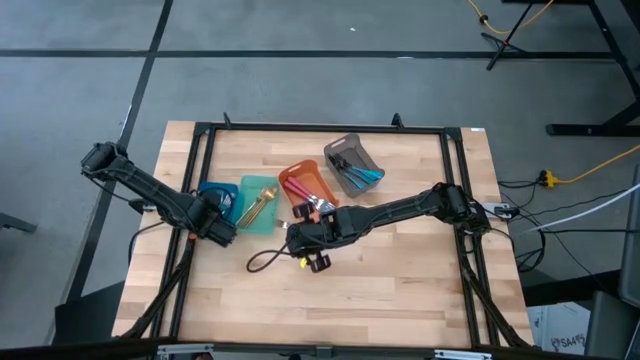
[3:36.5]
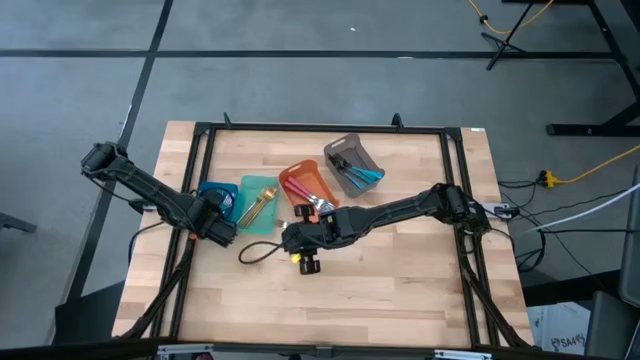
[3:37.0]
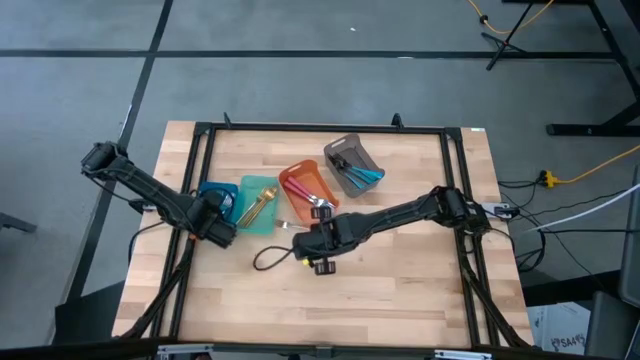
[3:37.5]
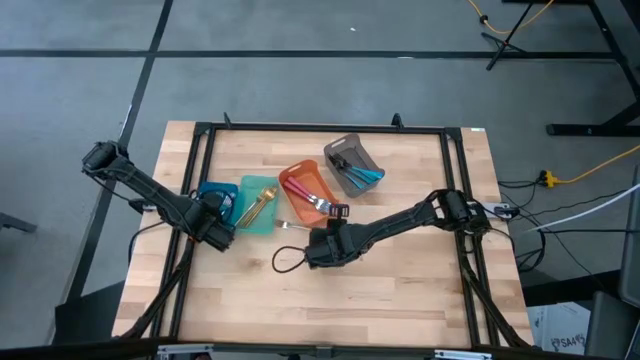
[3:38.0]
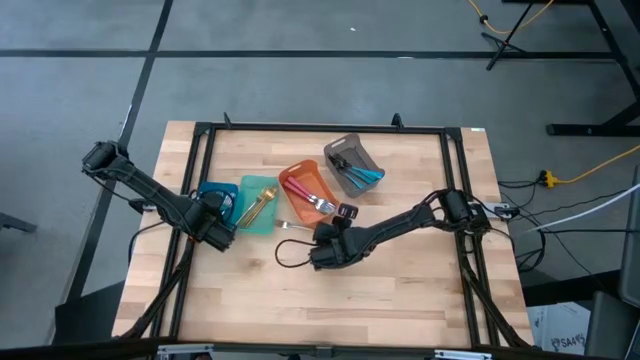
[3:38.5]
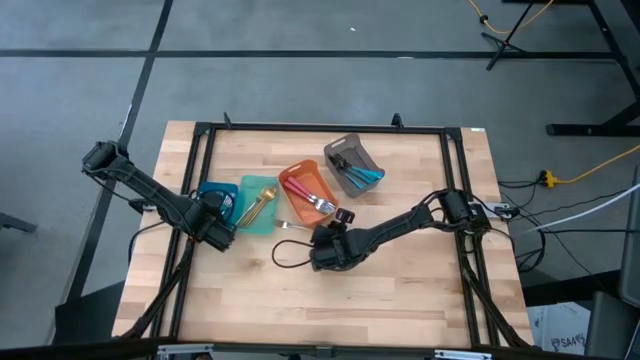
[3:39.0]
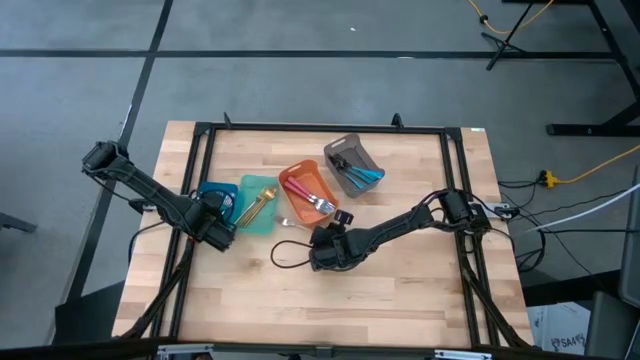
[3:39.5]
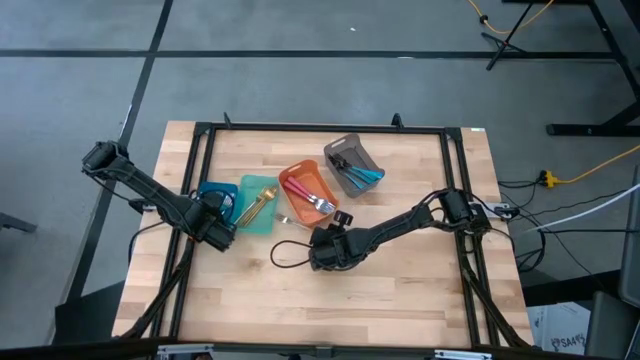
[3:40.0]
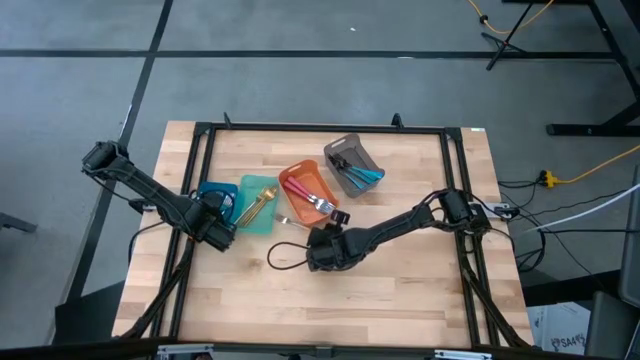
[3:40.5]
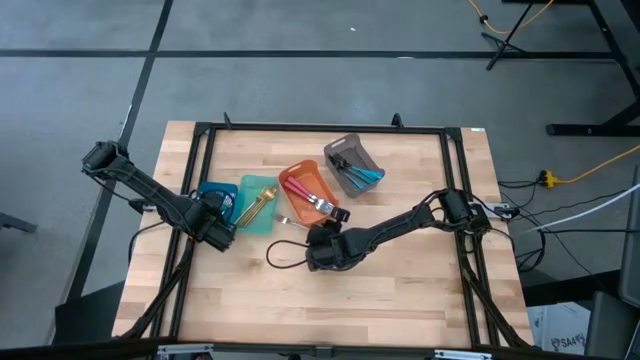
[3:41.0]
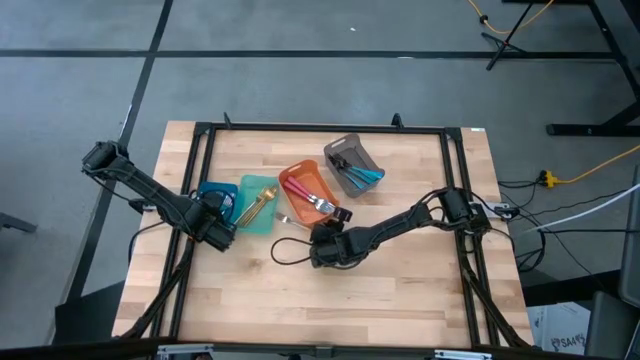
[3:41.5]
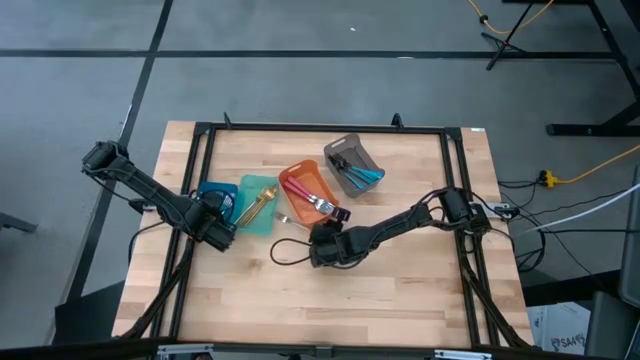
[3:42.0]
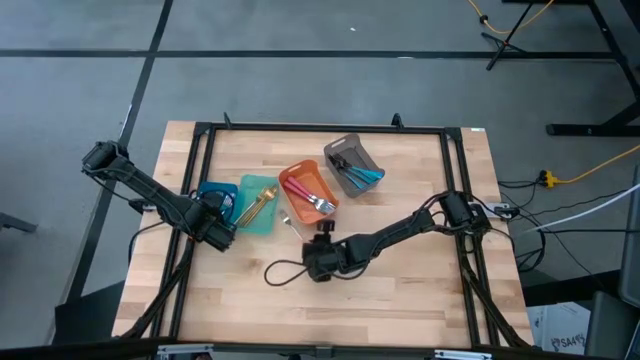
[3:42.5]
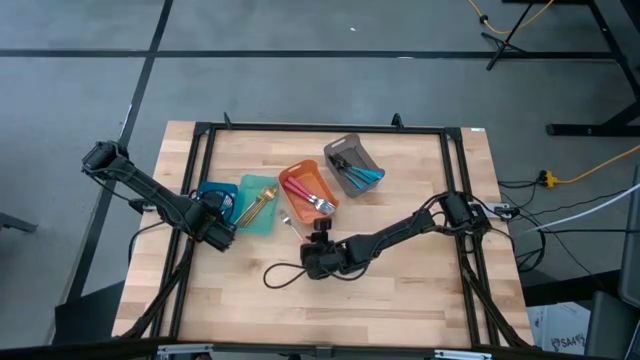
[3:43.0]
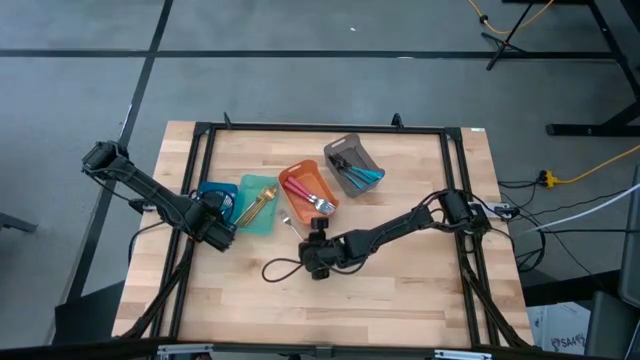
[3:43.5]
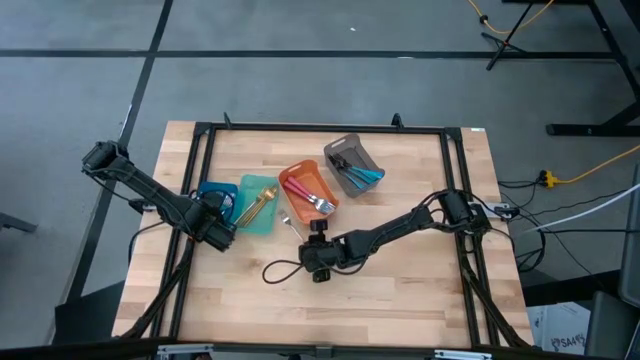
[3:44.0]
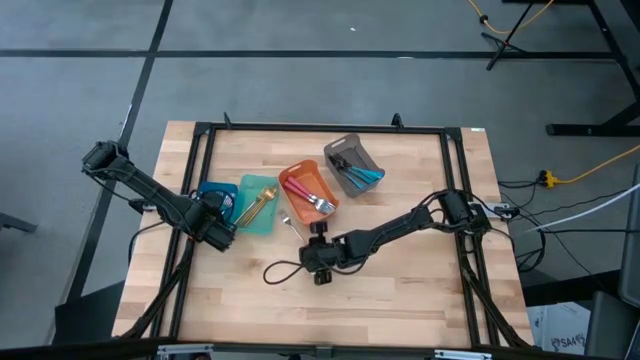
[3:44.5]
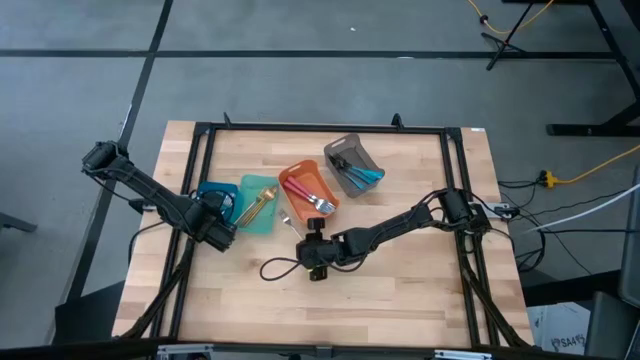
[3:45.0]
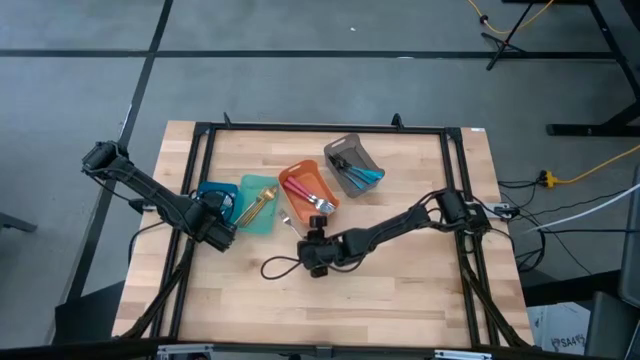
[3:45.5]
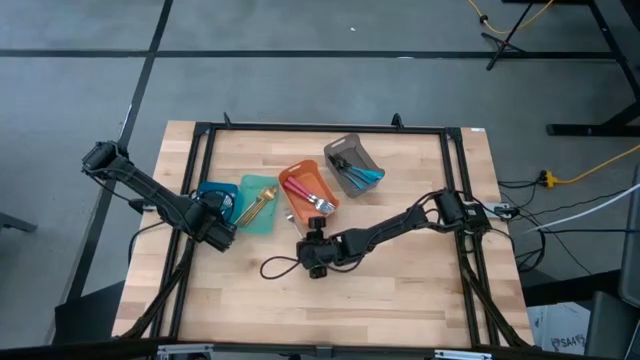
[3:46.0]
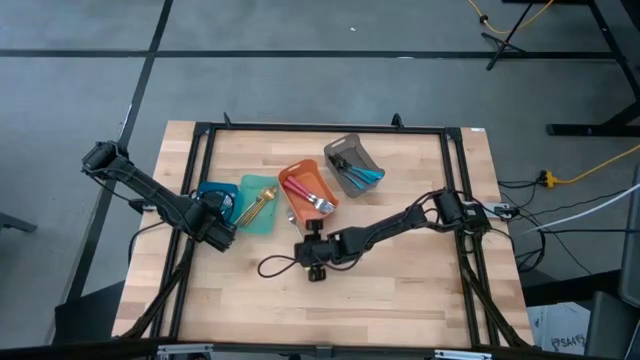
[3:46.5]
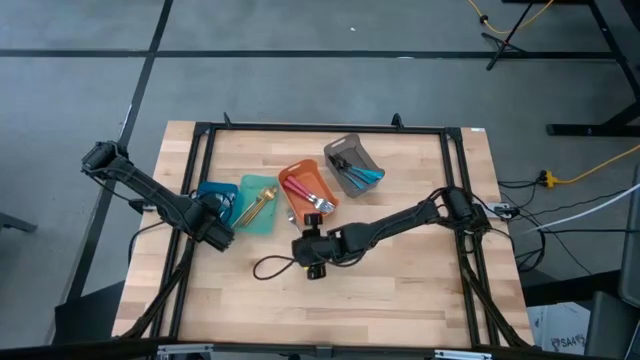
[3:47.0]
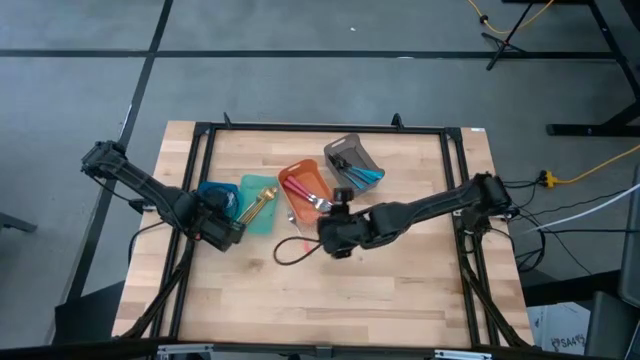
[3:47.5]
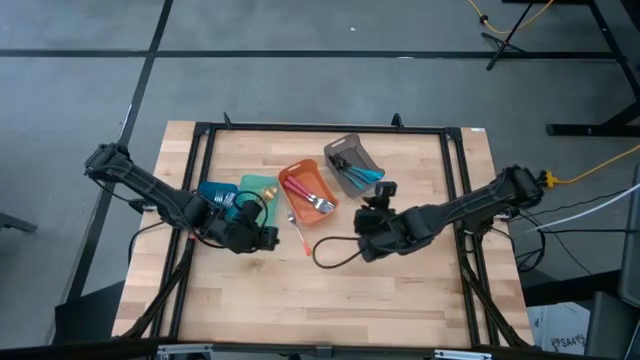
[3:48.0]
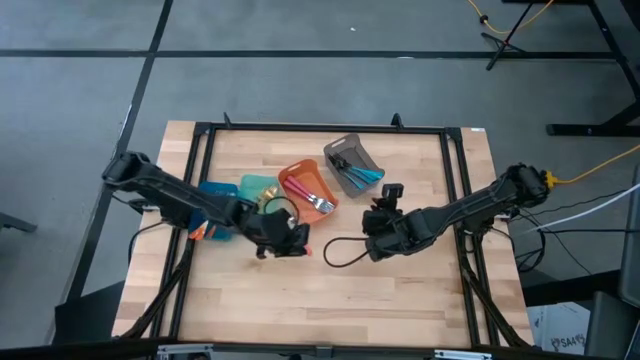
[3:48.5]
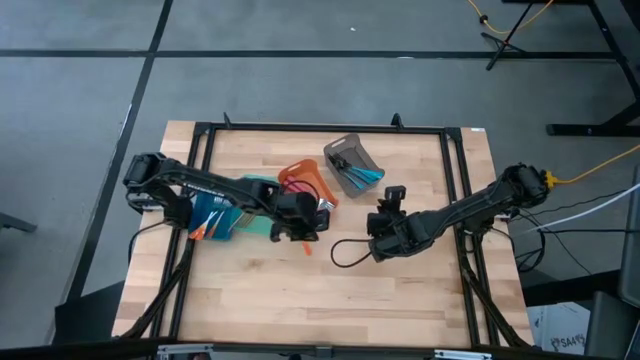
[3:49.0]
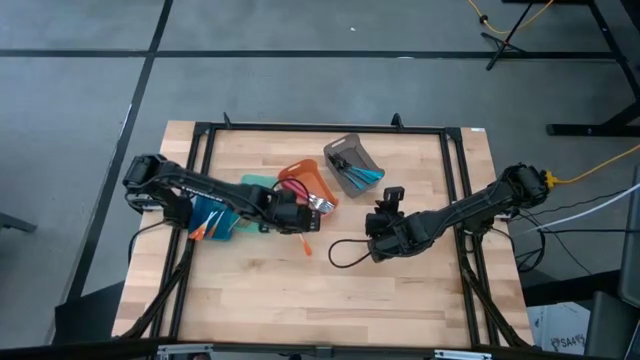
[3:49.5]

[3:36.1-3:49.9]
Task: Sort silverware by color (type)
Put the orange fork into the blue bin

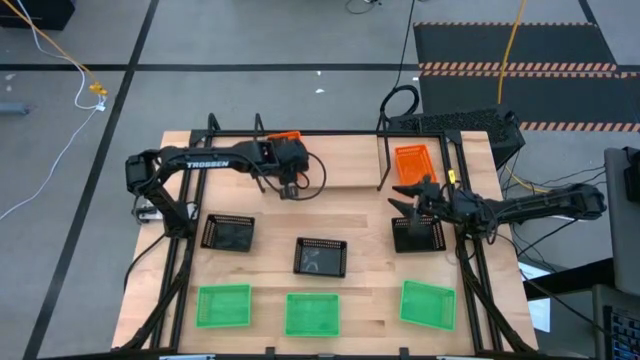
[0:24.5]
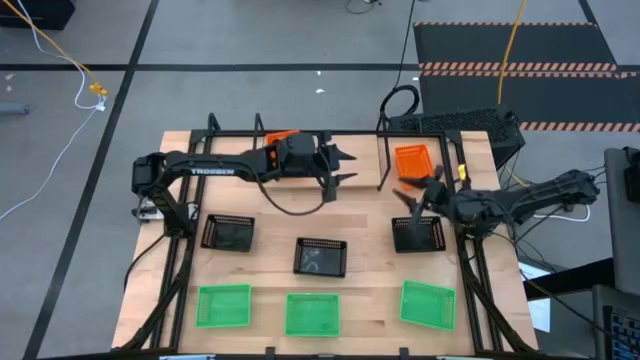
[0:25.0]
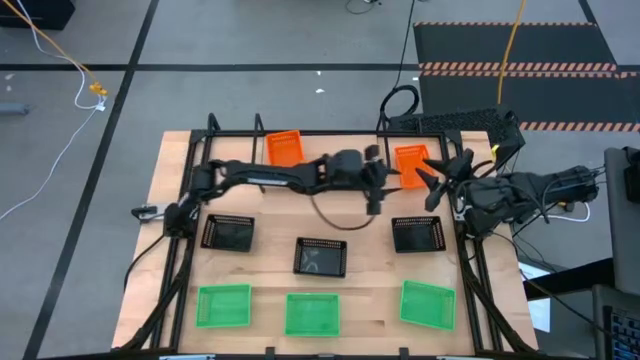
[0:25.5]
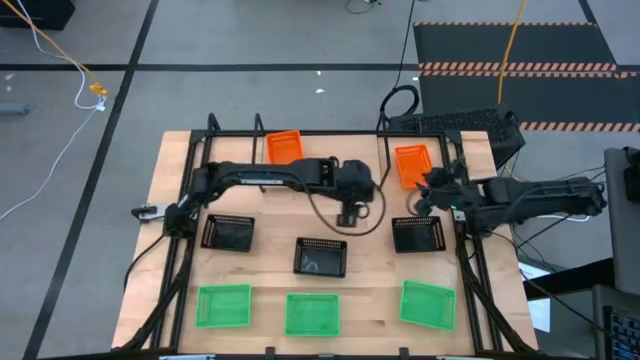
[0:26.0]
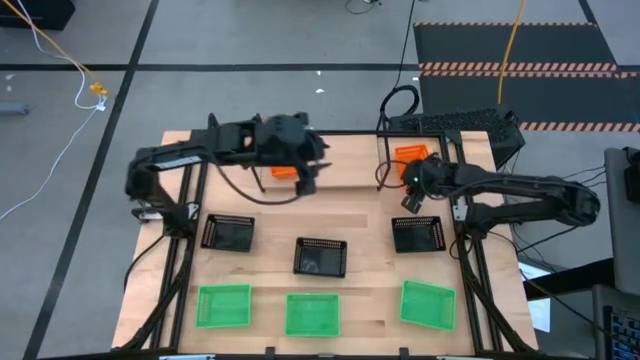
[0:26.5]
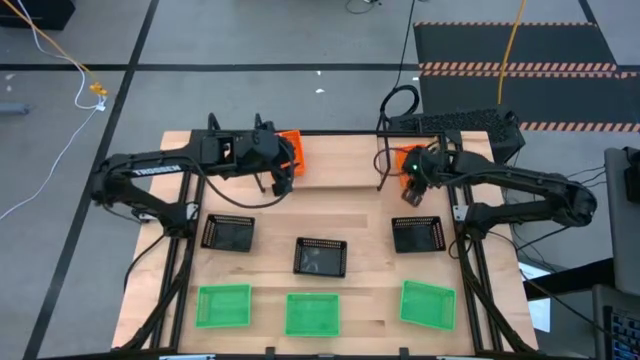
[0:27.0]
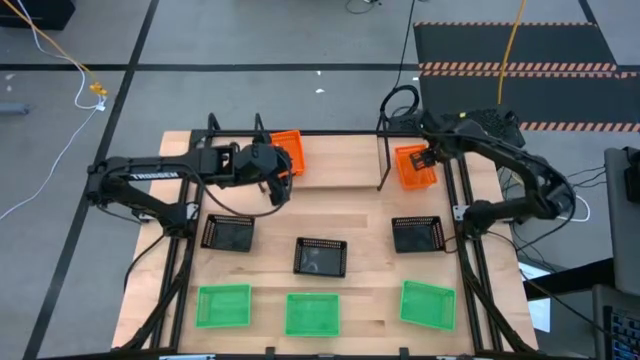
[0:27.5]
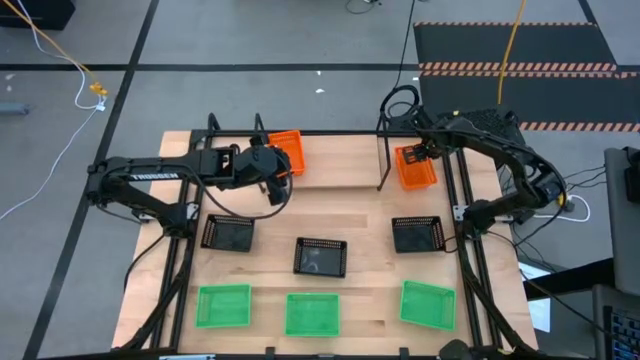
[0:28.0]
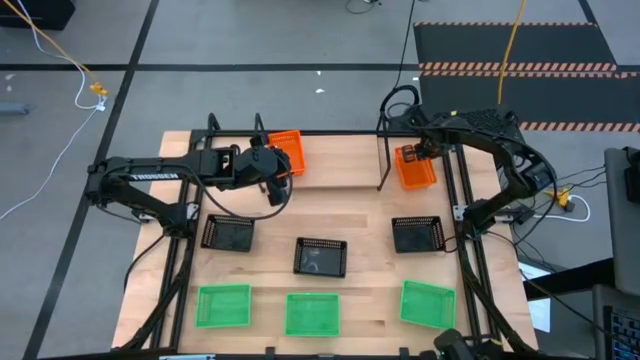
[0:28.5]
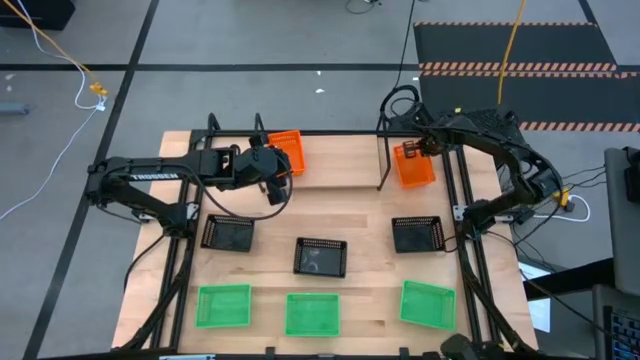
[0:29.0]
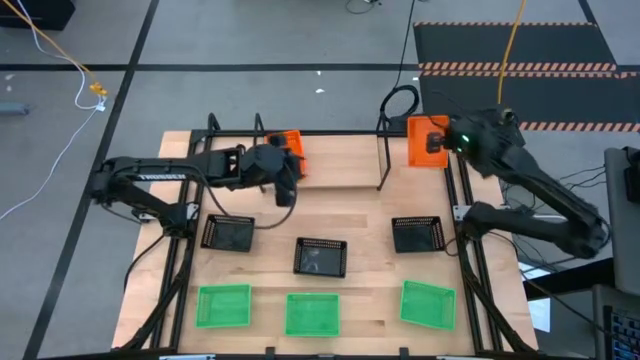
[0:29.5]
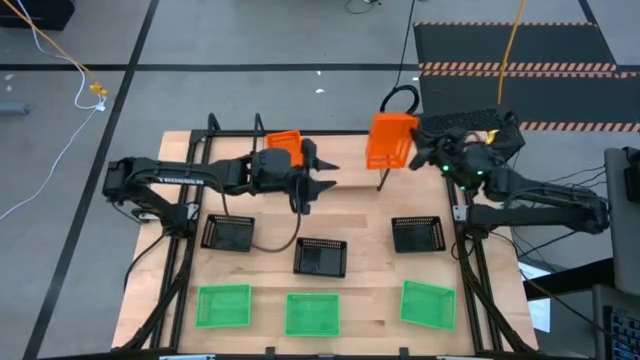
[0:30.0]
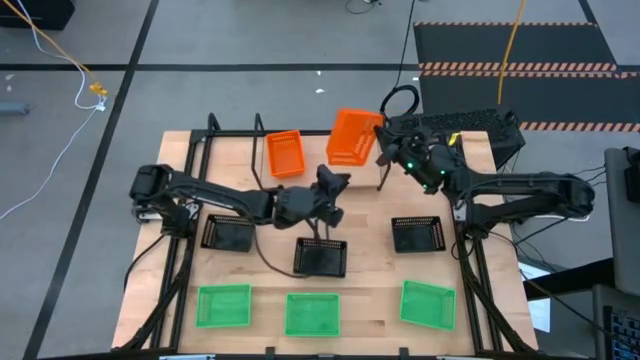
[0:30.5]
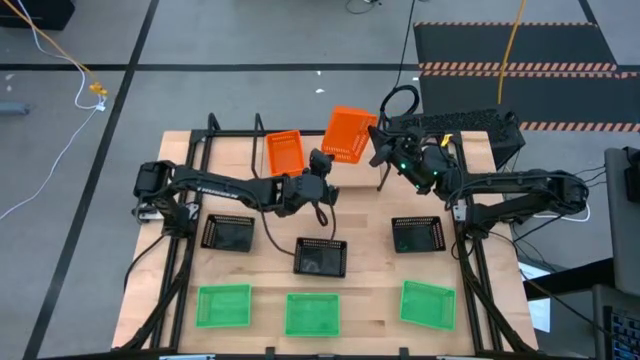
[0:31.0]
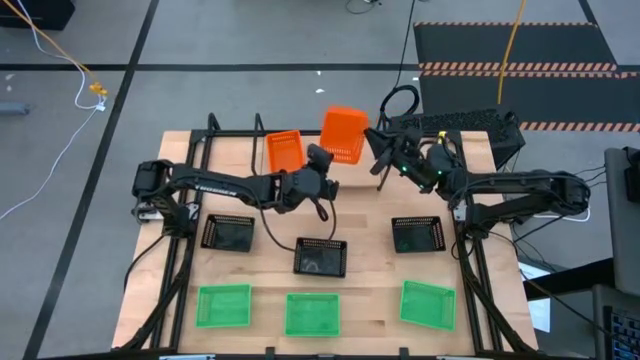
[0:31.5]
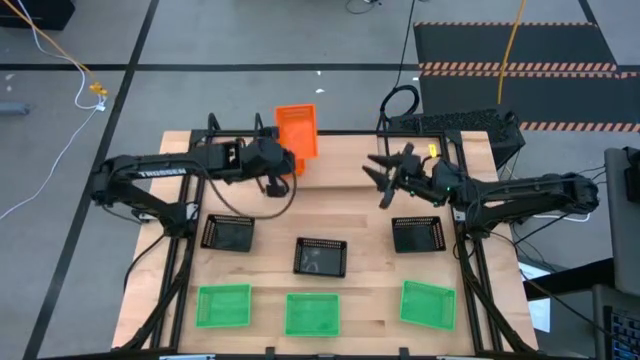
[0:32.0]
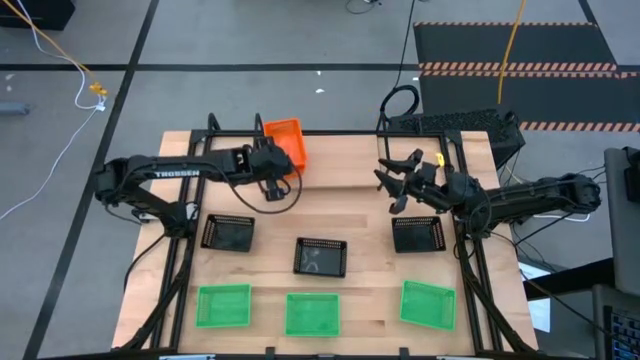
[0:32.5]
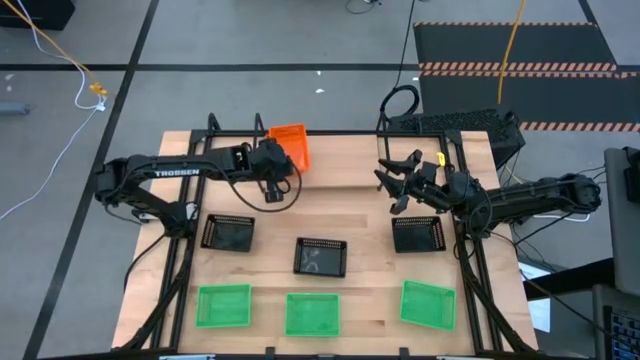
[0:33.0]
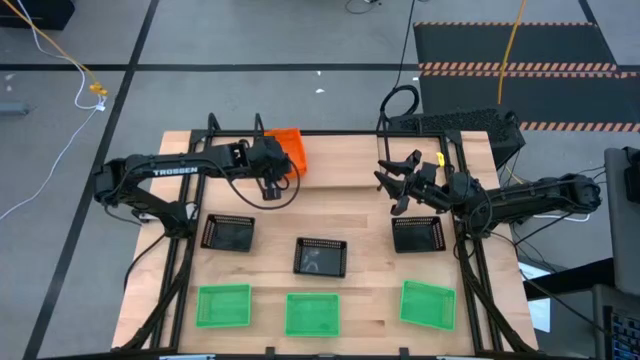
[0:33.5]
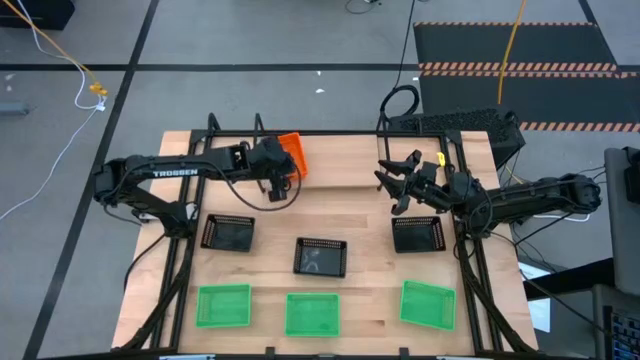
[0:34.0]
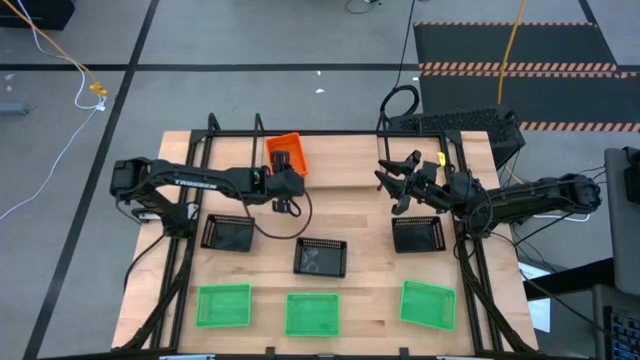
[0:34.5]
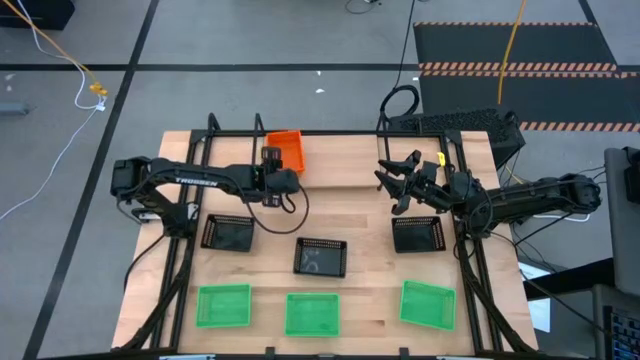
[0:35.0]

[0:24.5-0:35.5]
Task: Stack baskets on shelf by color
Stack the orange basket on top of the orange baskets on the shelf
